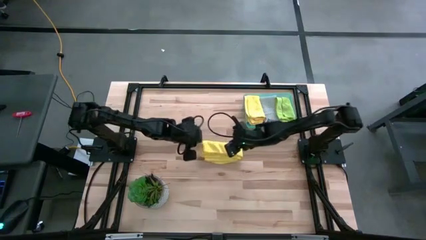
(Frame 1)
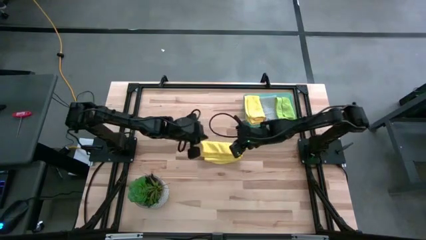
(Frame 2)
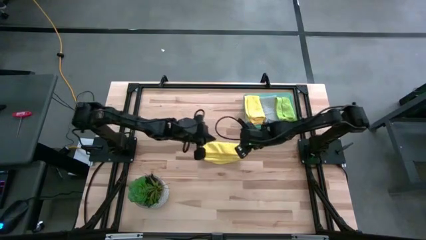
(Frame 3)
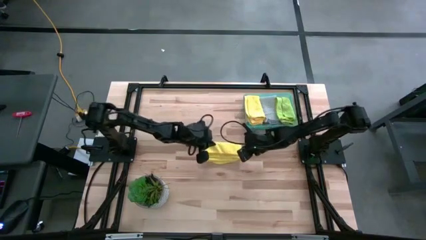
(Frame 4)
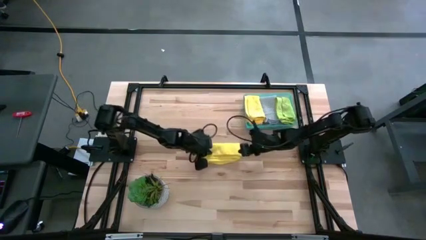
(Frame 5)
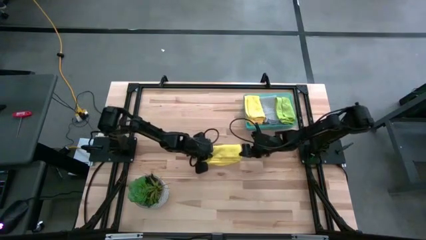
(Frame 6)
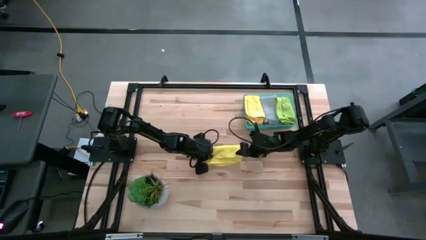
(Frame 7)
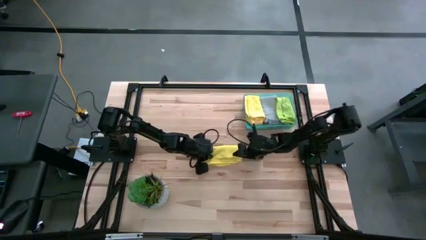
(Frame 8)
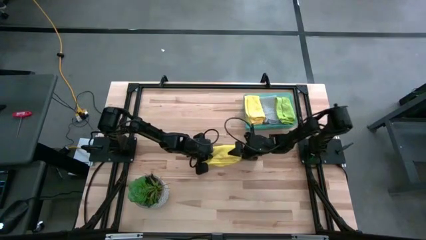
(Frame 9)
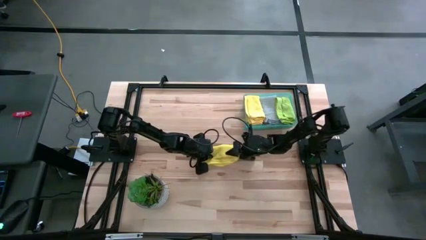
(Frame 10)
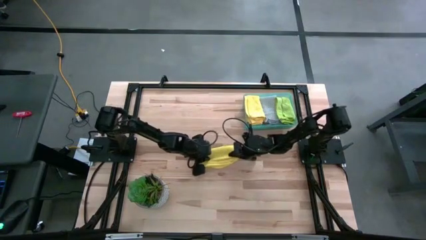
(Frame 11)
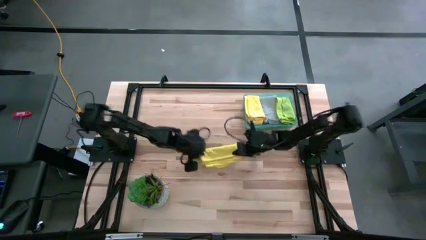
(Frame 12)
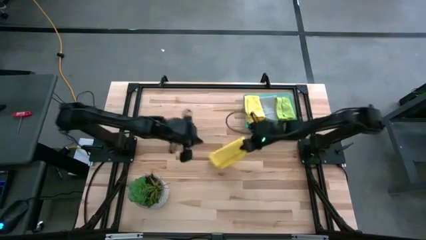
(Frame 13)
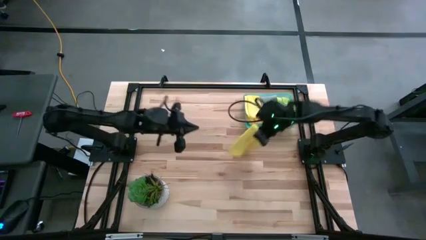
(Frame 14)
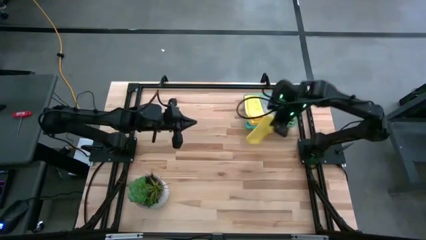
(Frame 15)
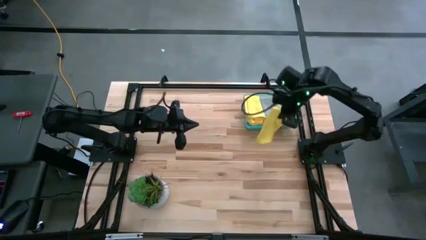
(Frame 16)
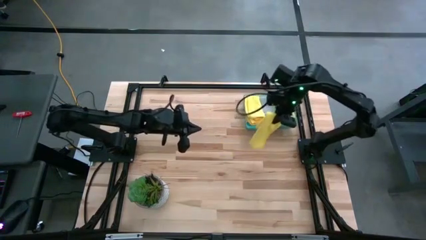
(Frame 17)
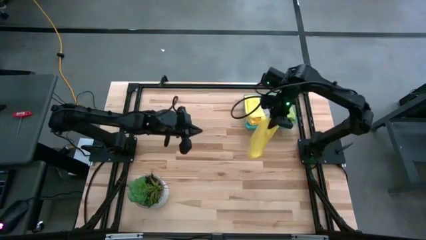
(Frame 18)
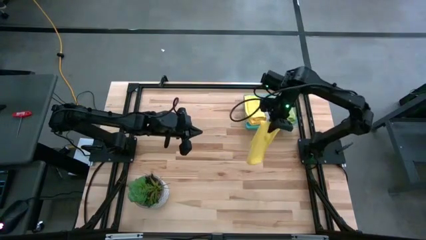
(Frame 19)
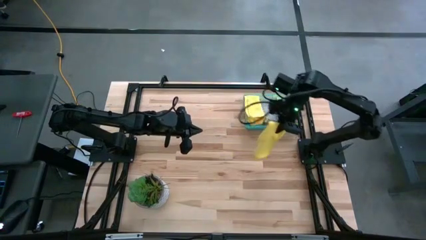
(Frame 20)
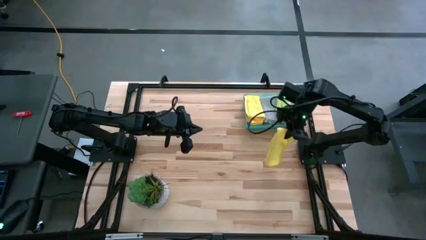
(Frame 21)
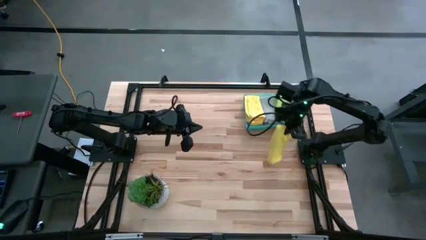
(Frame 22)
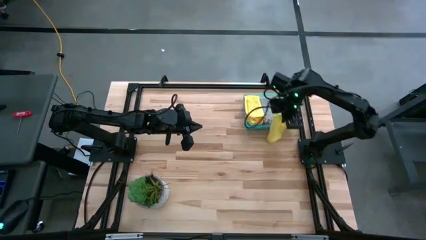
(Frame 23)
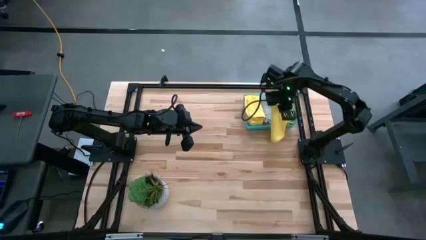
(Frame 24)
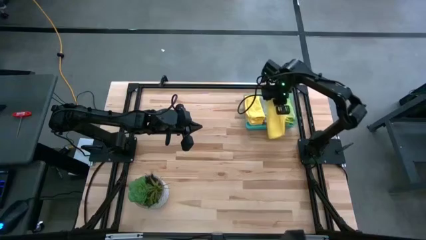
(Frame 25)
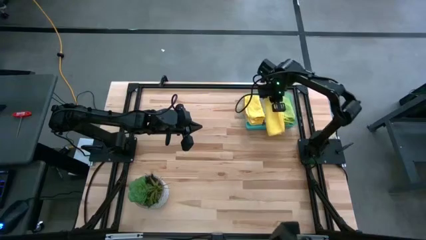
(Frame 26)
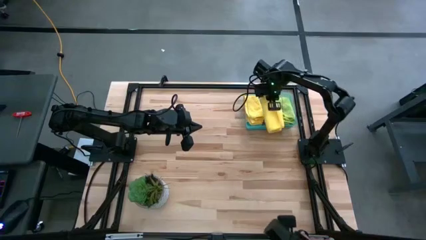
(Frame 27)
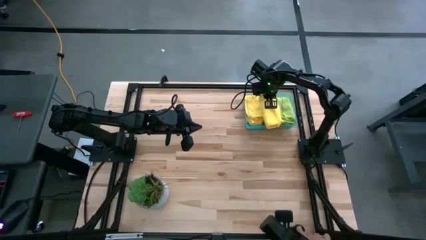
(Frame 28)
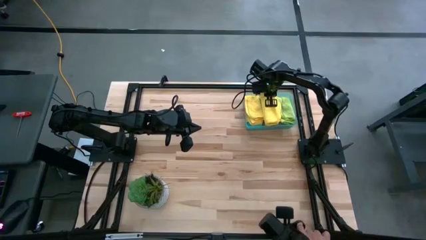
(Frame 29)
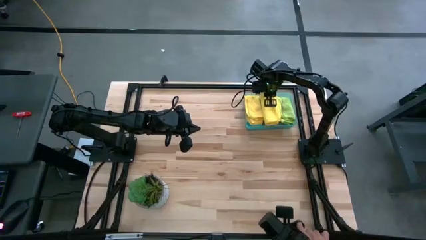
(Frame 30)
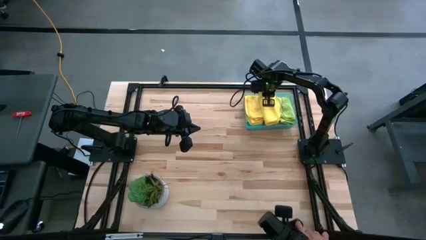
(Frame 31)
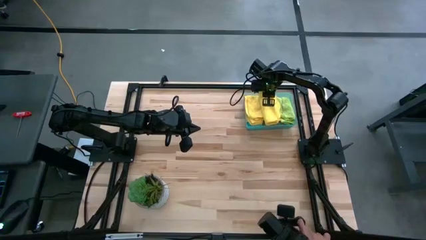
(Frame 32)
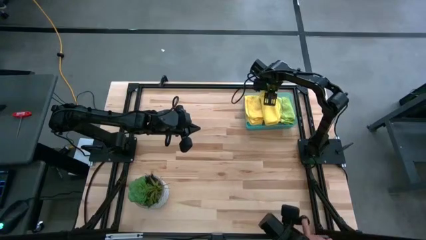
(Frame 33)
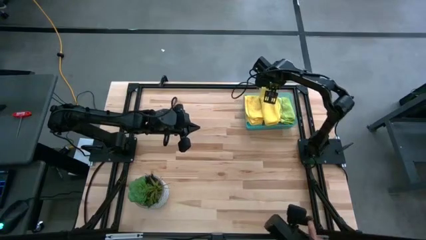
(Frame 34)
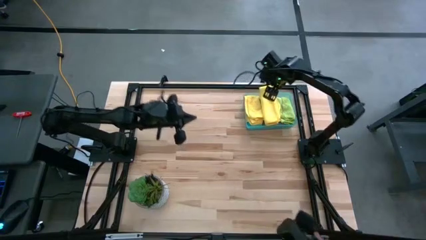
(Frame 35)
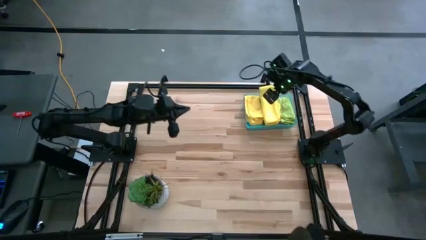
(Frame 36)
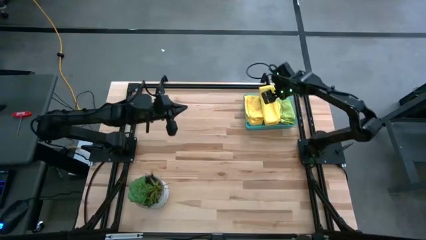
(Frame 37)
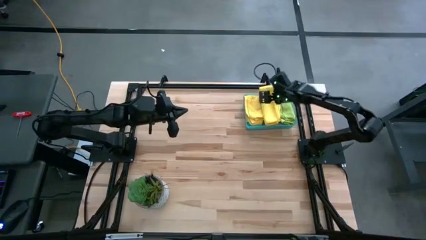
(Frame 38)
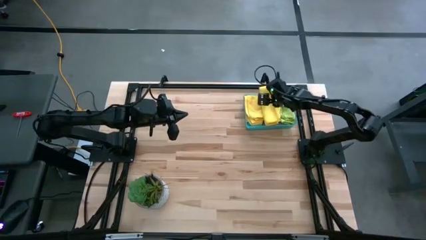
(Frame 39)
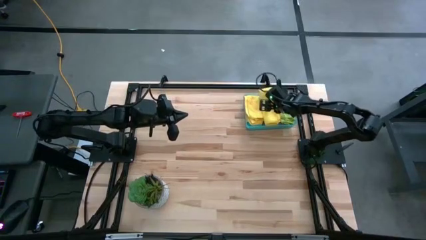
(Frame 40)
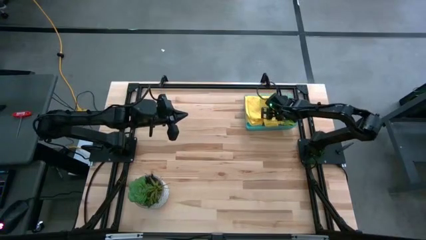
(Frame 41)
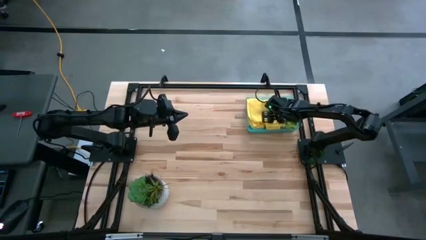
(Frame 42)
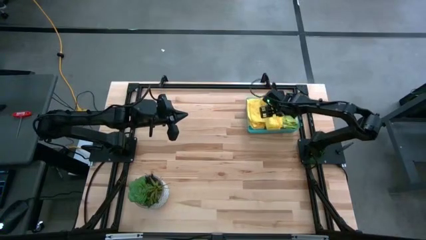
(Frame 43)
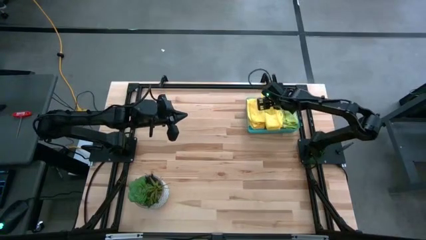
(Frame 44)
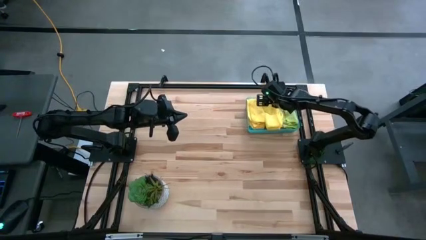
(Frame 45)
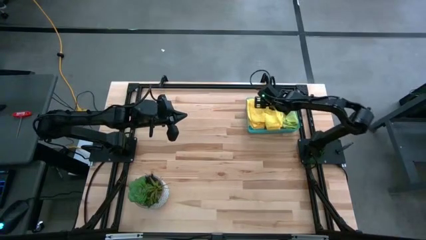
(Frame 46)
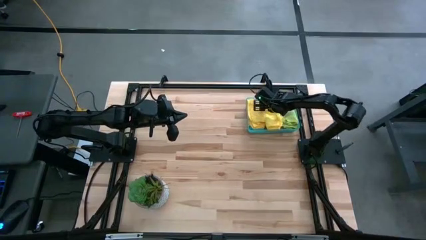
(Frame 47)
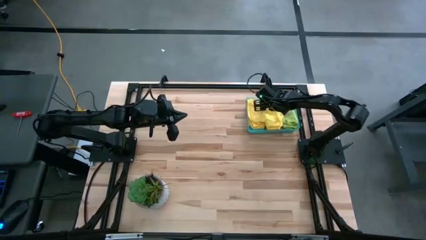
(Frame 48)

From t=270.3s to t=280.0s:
Task: Fold microfiber towels
Put the yellow towel into the green bin

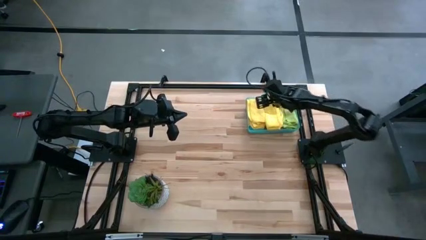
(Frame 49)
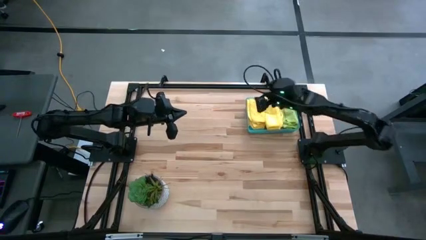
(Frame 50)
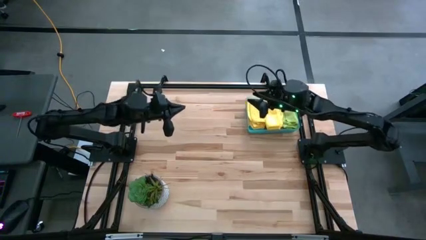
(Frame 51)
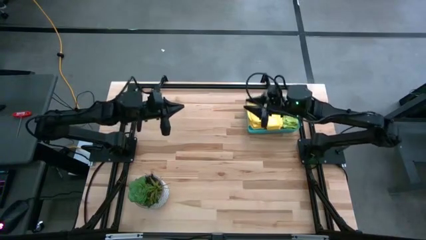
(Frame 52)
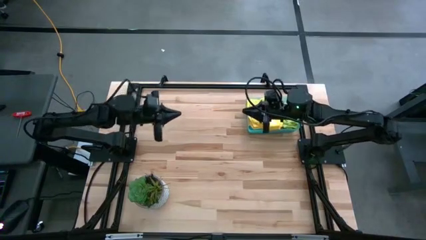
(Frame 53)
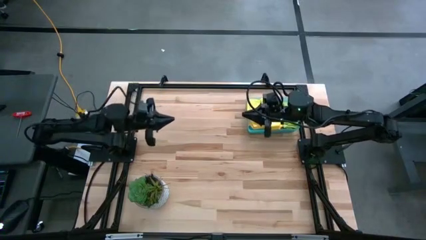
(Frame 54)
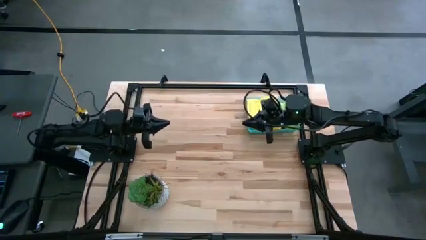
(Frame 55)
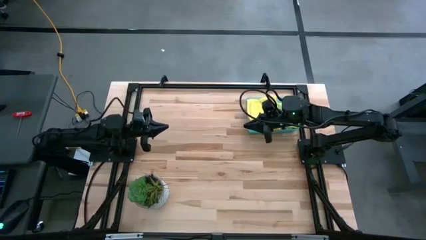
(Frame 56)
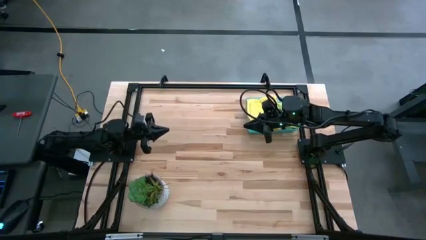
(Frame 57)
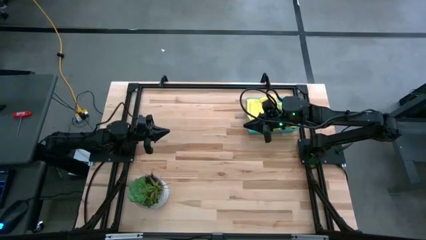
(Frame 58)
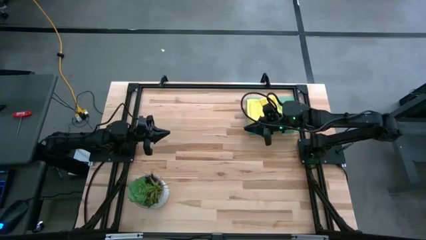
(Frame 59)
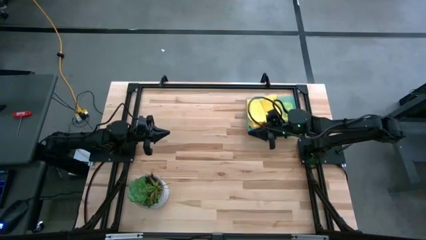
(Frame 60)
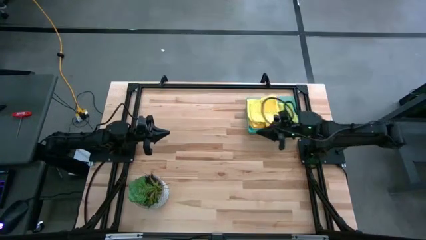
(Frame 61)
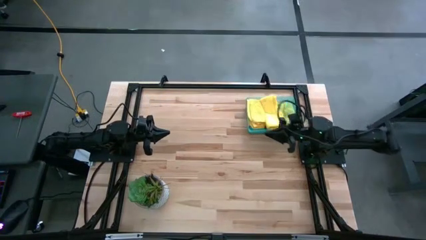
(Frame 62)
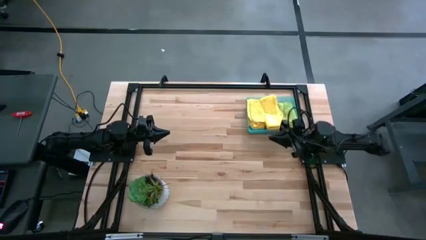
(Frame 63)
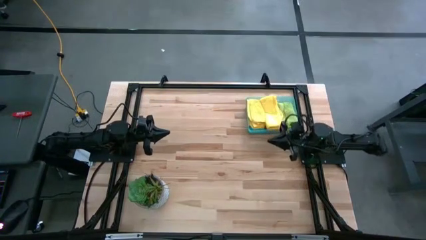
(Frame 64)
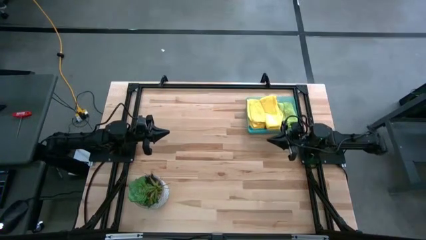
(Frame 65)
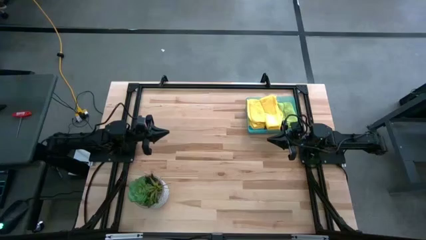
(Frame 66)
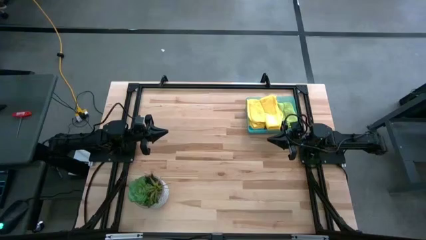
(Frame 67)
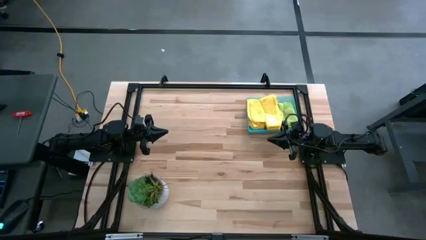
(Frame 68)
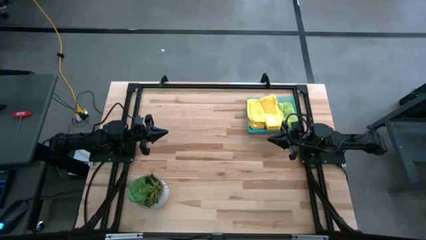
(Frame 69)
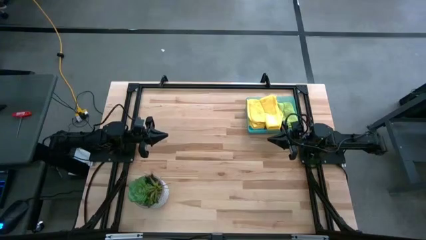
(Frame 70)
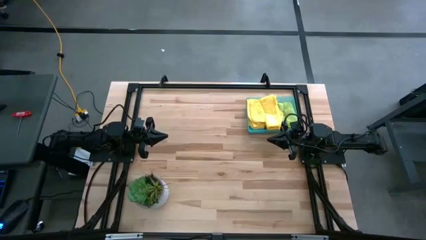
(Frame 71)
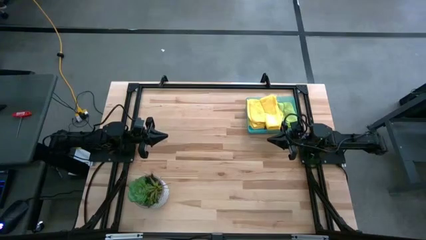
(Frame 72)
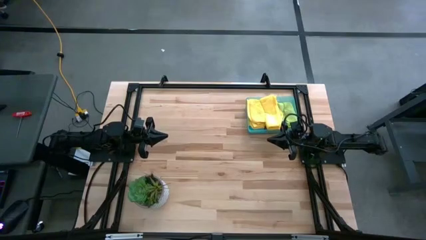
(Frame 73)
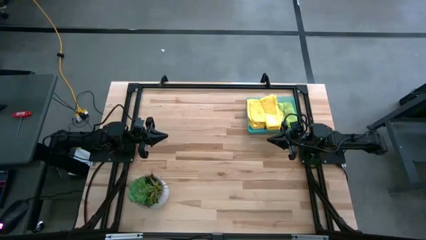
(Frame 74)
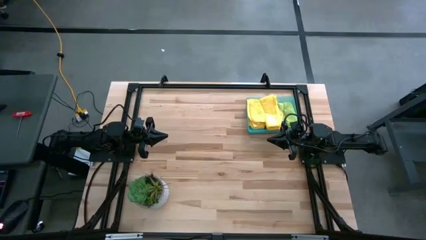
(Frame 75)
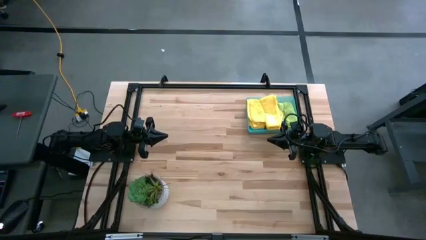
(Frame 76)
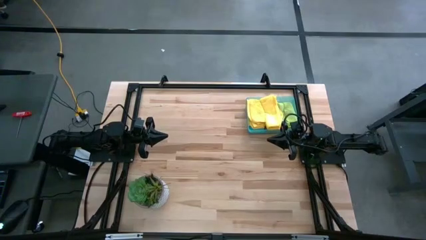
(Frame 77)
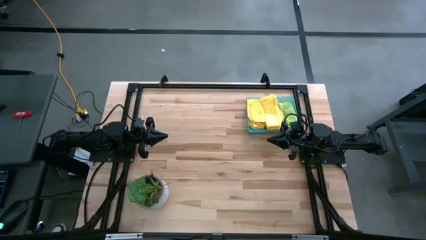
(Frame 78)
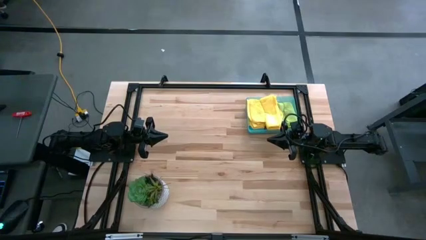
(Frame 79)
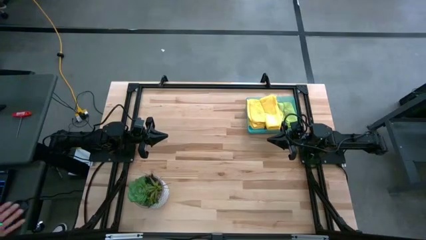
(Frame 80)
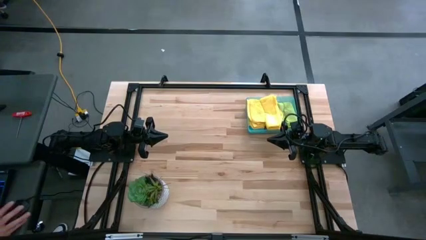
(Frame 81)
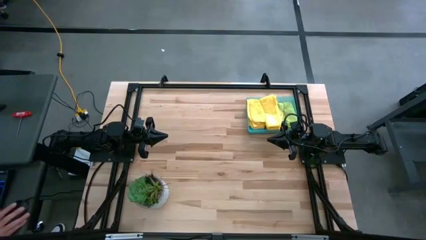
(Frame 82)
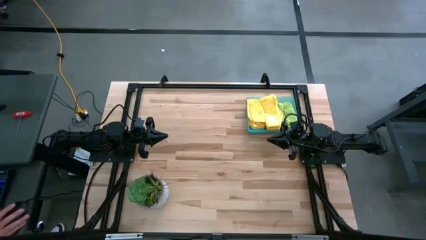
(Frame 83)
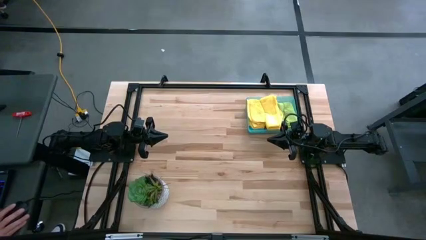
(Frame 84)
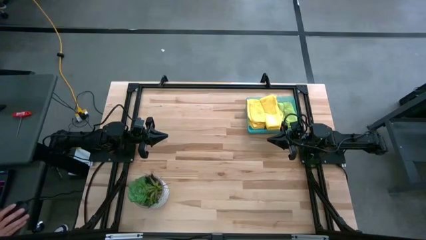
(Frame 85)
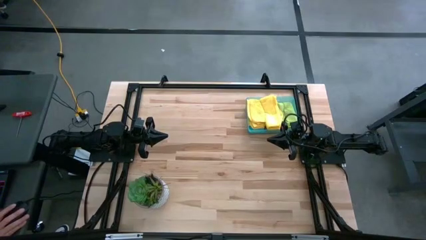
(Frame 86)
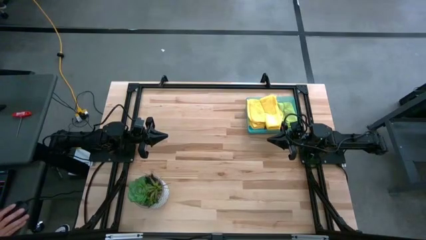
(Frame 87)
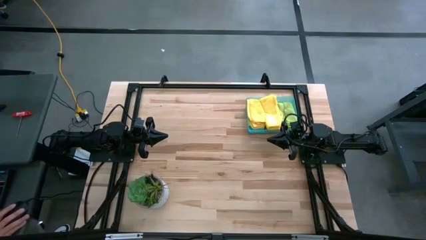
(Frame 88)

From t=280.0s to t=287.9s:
Return to Home Position
